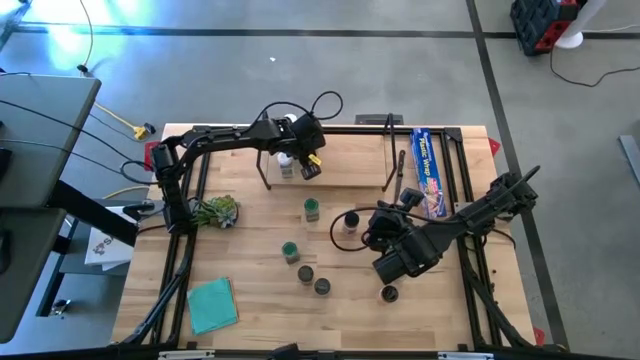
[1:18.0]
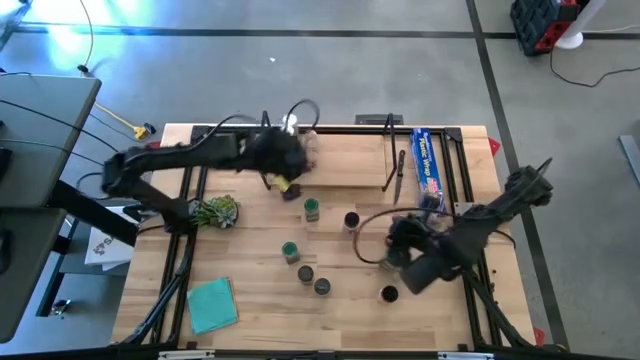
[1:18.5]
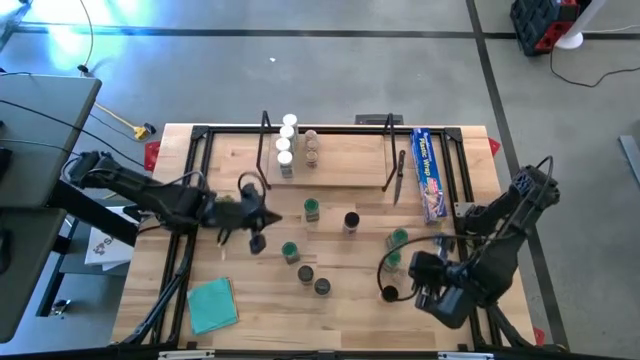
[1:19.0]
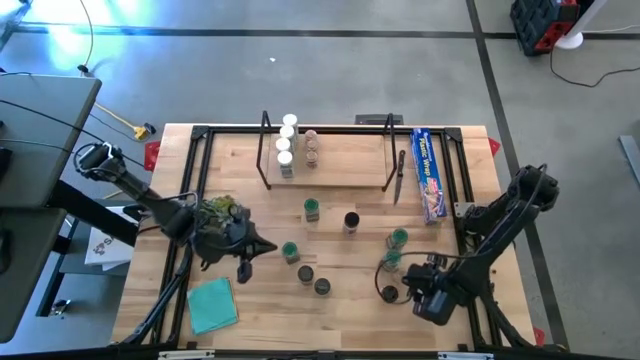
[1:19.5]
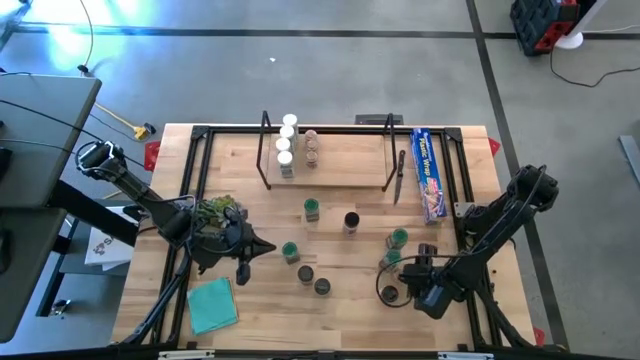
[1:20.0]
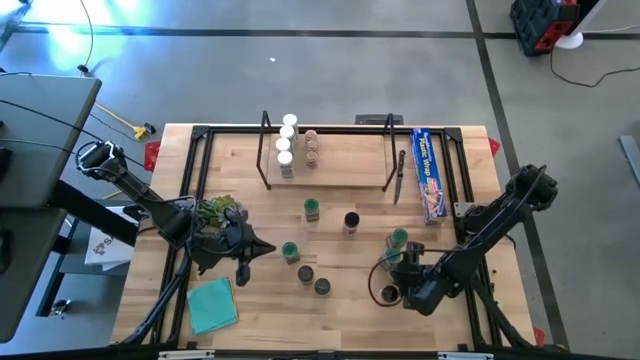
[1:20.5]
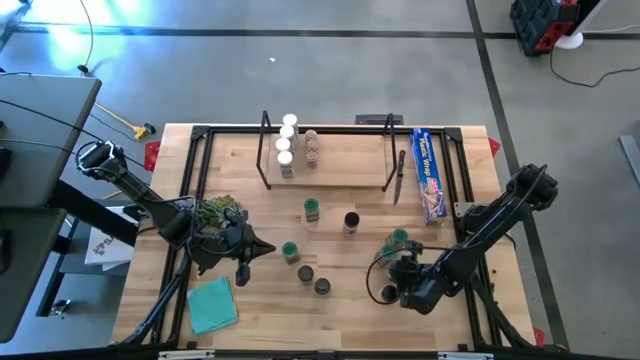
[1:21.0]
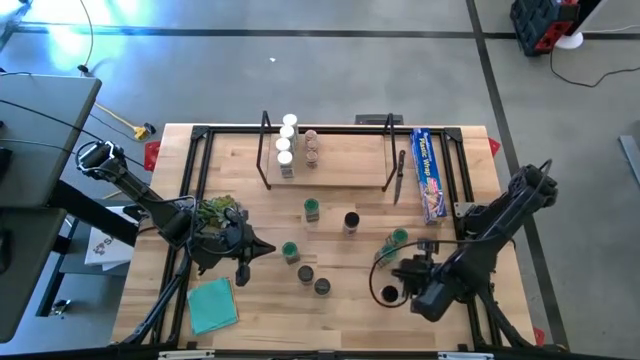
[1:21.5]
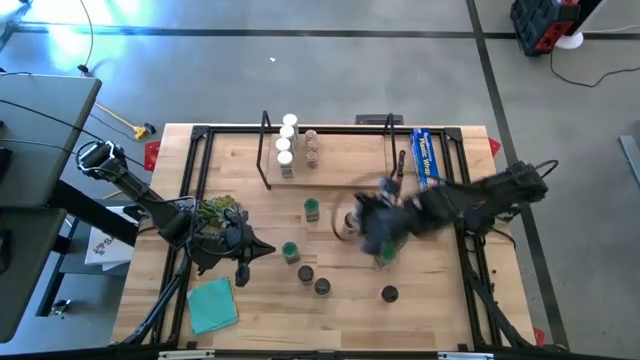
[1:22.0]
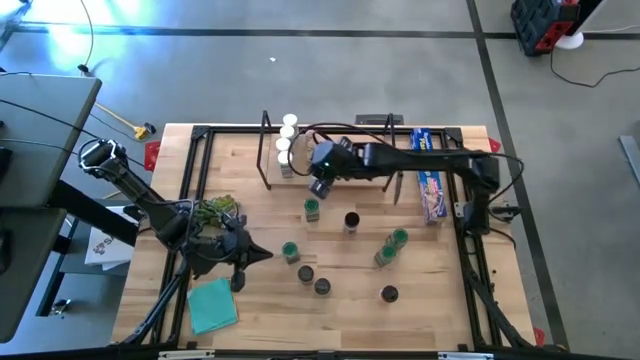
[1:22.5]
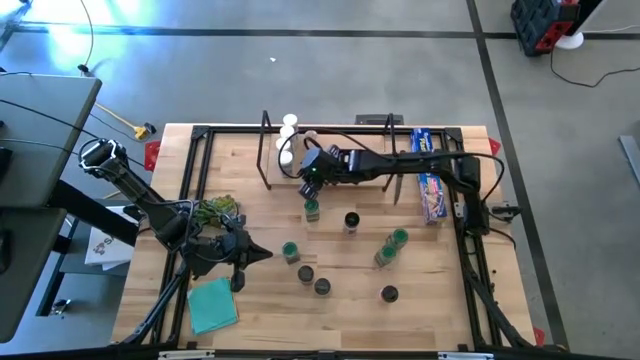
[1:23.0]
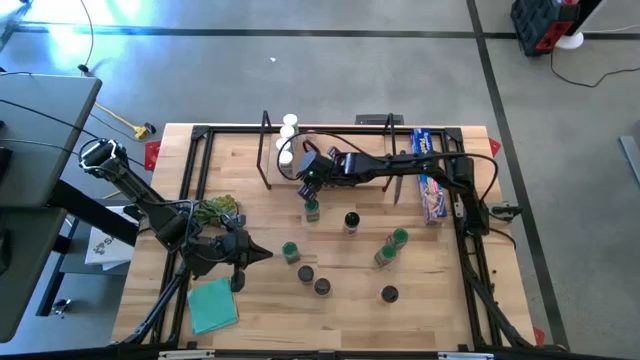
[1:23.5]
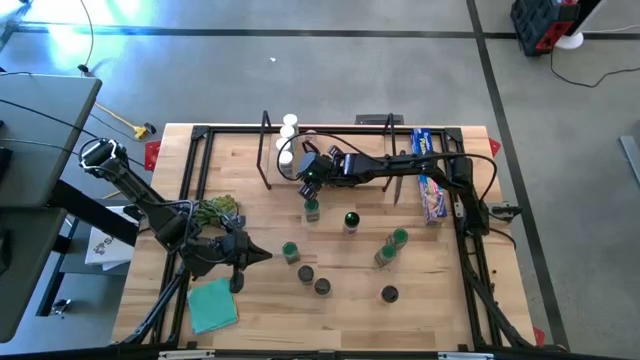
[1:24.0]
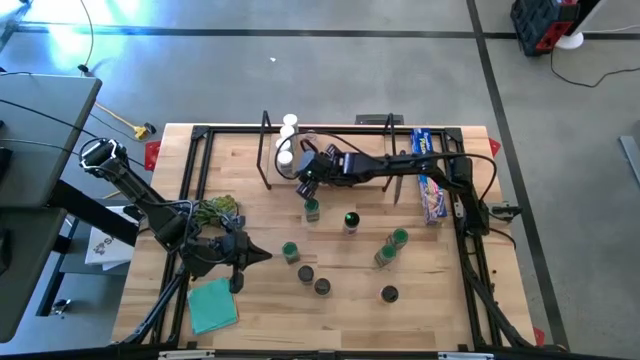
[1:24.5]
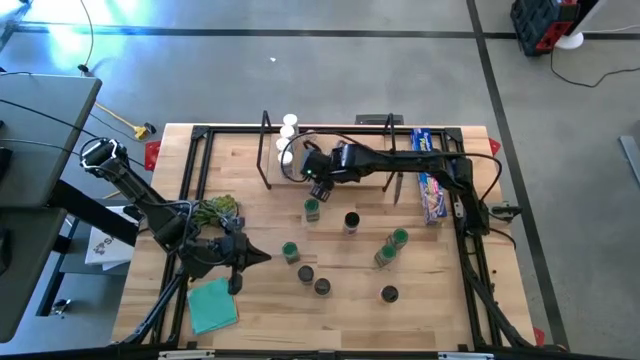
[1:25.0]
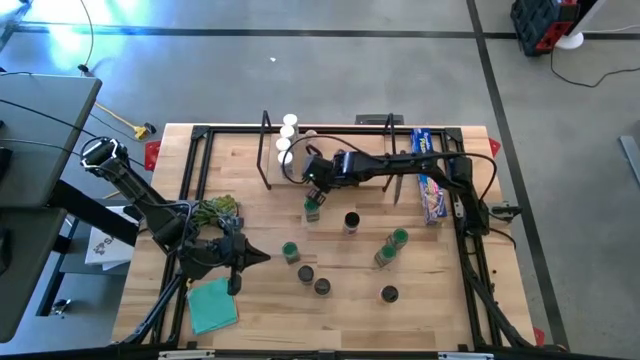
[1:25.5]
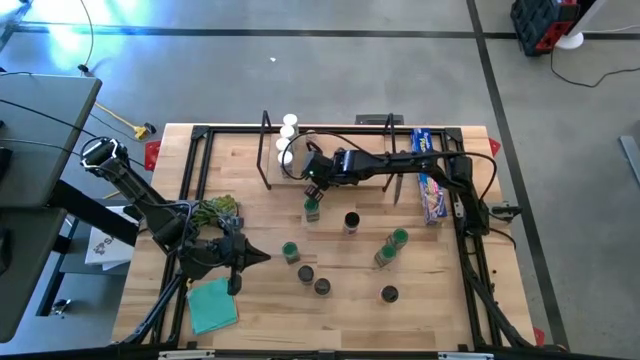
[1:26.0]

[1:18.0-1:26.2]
Task: Shelf spices
Put the brown seasoning bottle on the shelf aligned with the other brown seasoning bottles

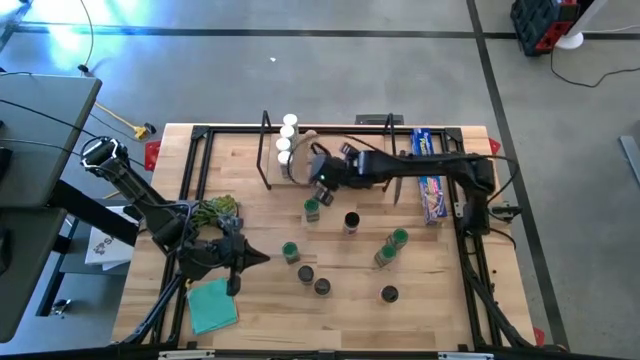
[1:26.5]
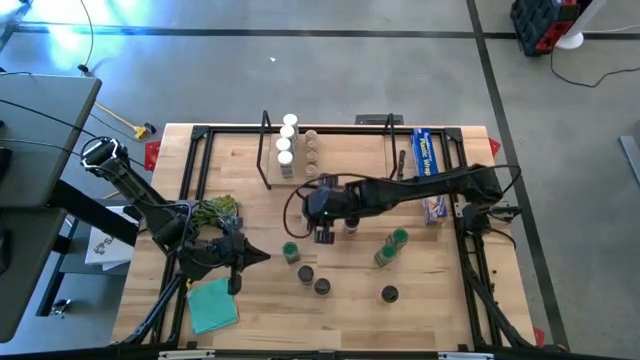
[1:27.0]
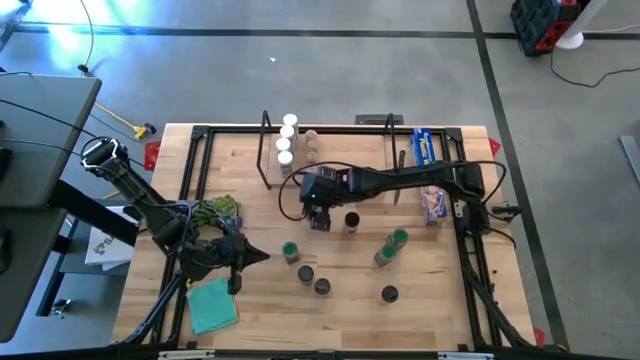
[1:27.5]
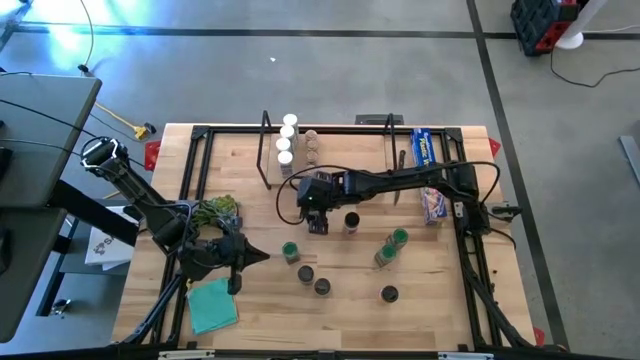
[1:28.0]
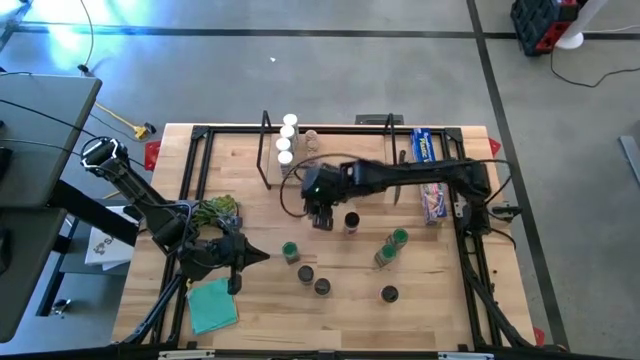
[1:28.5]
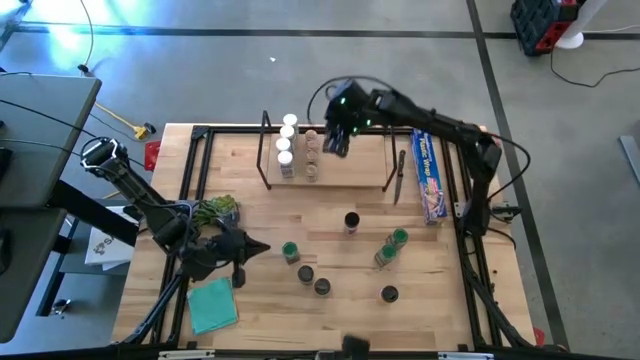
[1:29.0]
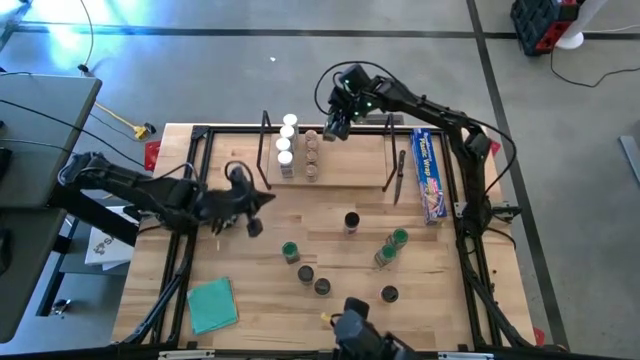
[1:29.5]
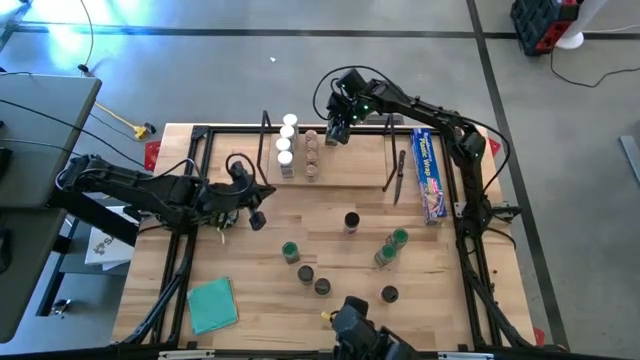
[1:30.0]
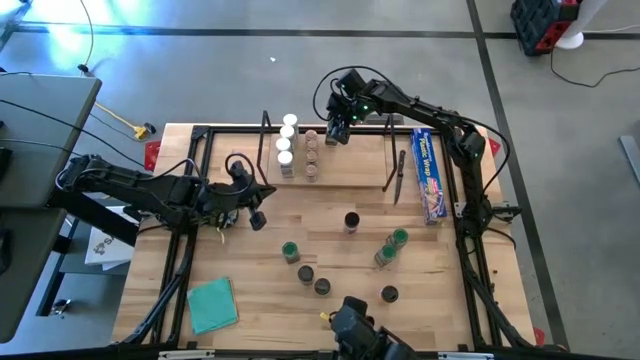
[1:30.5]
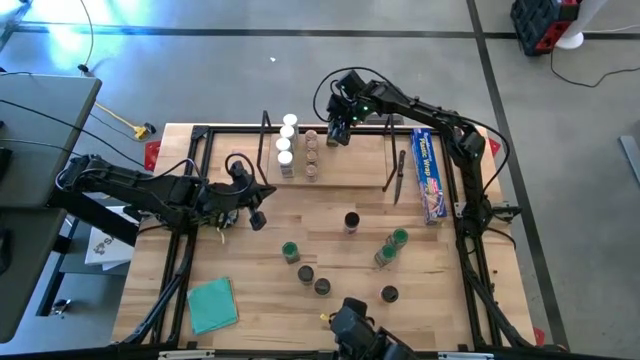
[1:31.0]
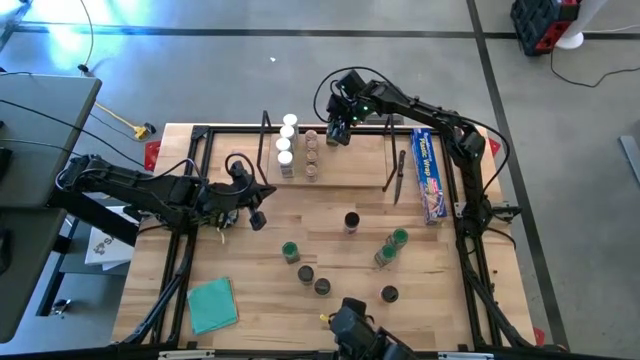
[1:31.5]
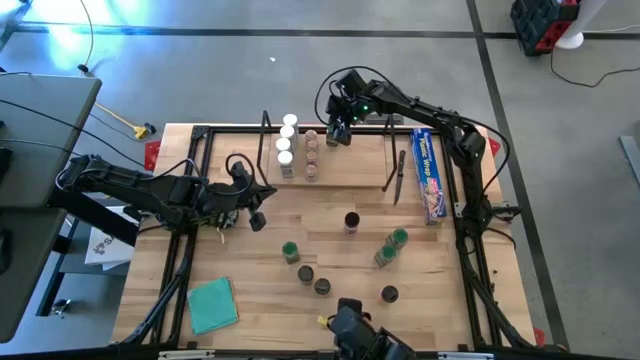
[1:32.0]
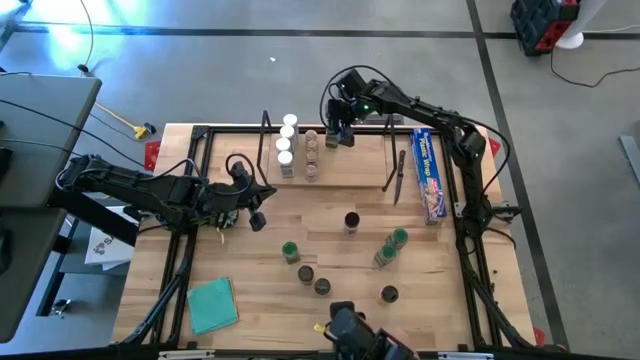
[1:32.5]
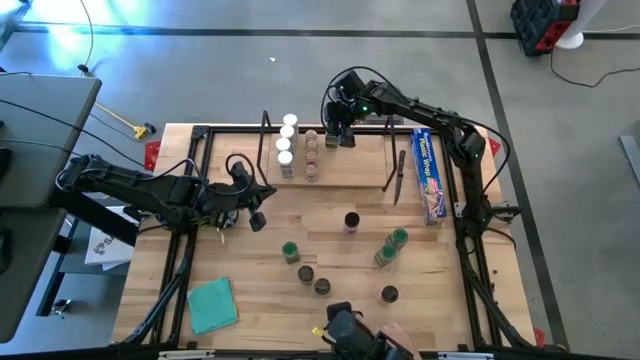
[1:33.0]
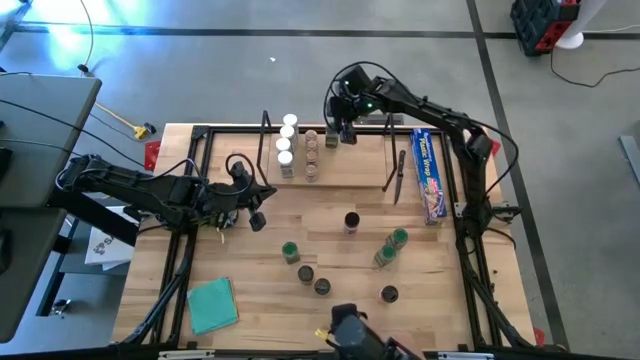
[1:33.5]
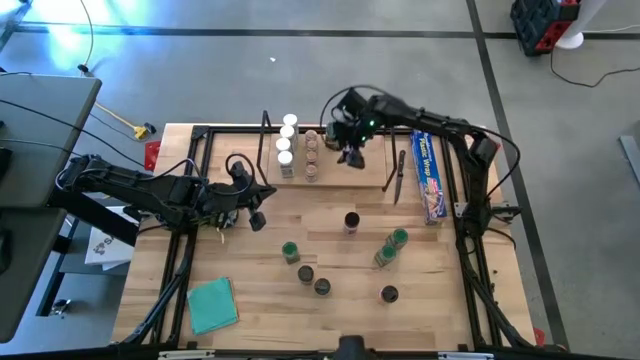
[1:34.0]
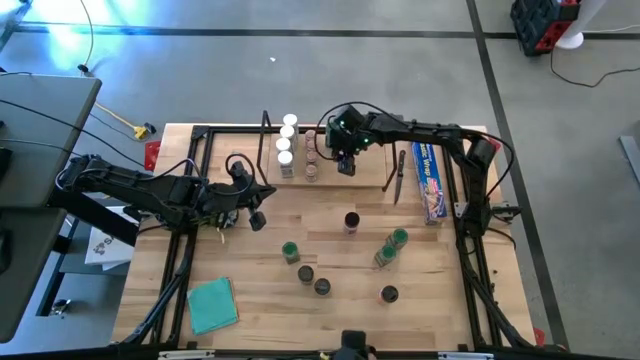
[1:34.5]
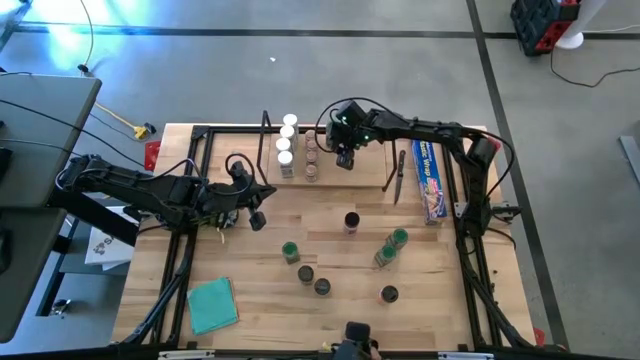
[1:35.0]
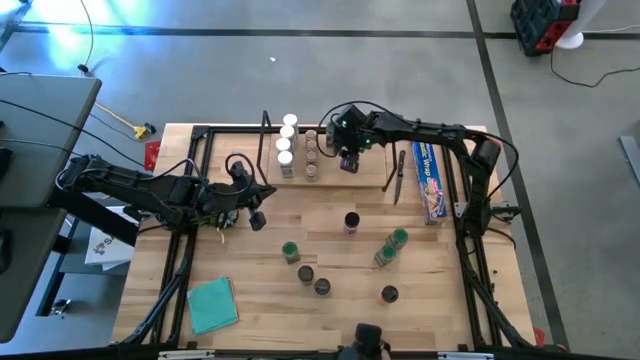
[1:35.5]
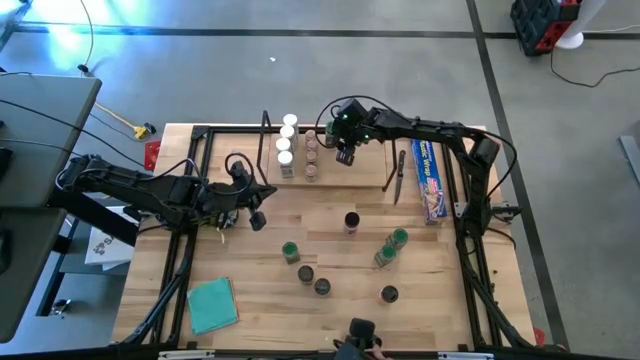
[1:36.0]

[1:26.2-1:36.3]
Put the green seasoning bottle on the shelf

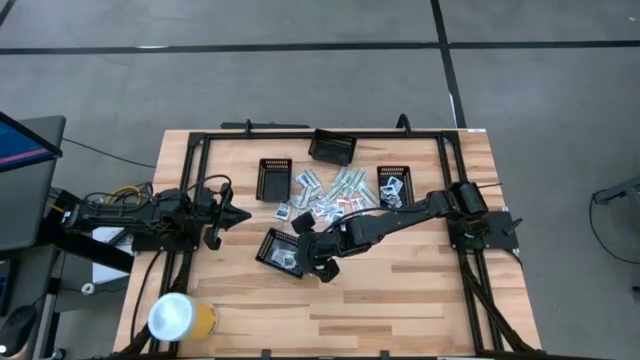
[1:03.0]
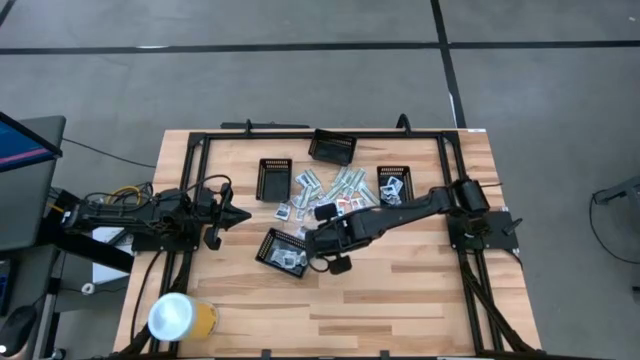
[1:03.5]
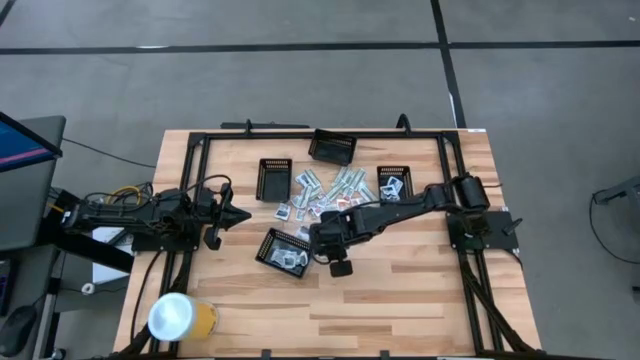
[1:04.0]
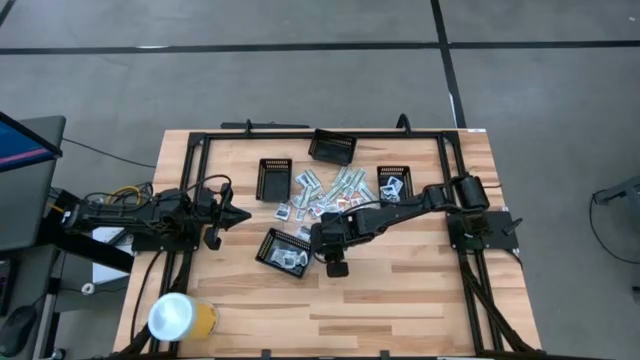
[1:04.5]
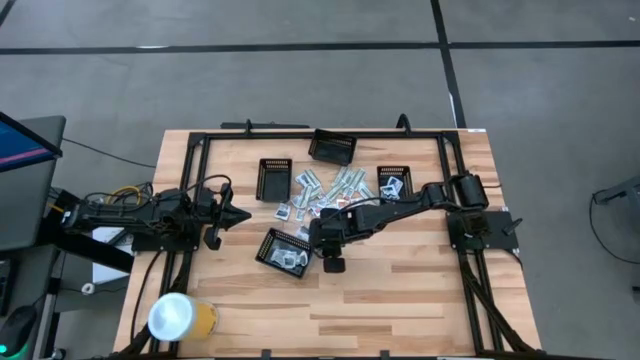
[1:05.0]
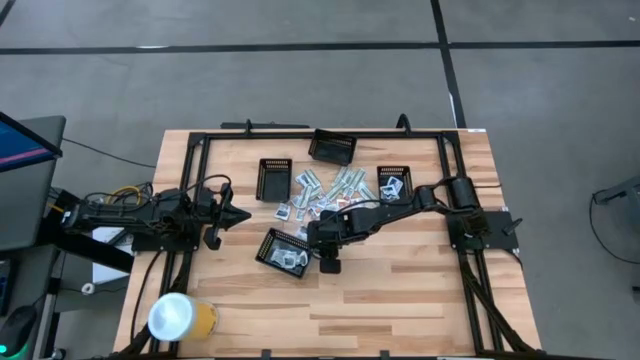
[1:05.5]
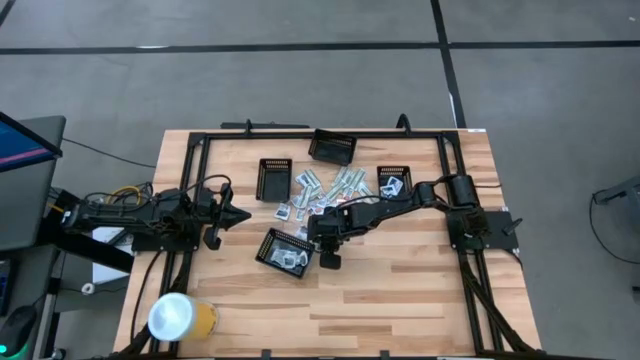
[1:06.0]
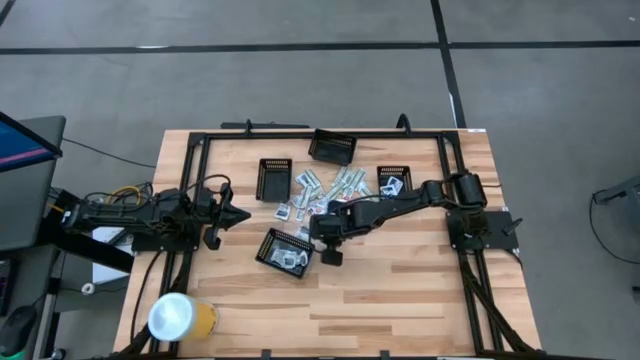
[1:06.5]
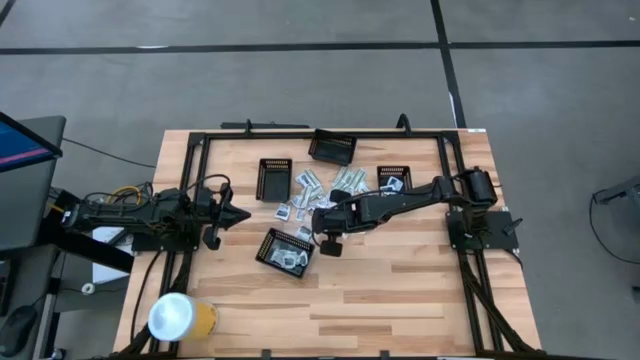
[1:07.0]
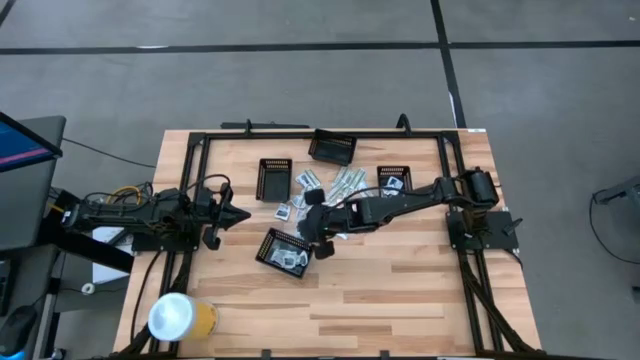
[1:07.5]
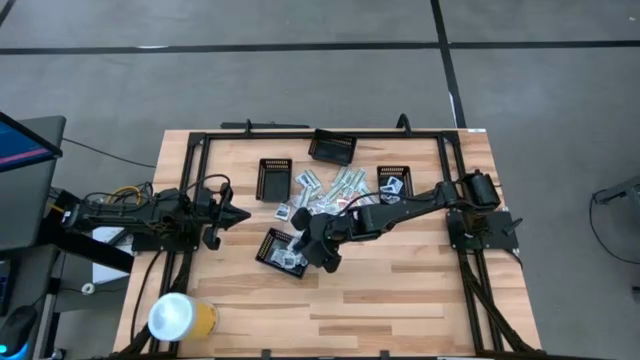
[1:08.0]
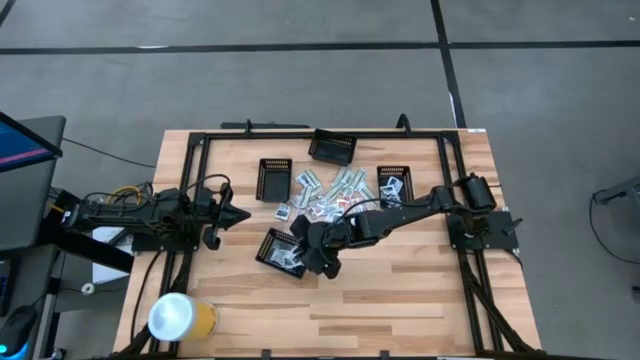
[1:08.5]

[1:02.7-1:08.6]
Task: Pick & Place First Aid Supplies
Put the white towelette pack into the bottom black bin
